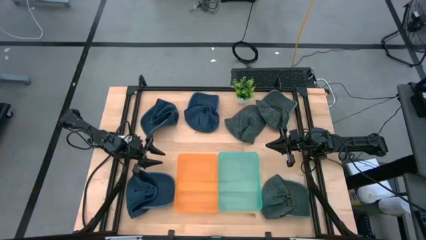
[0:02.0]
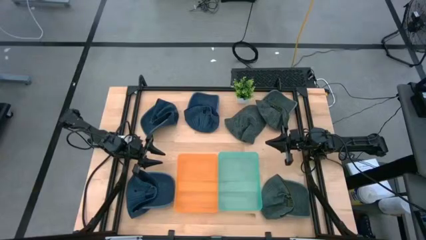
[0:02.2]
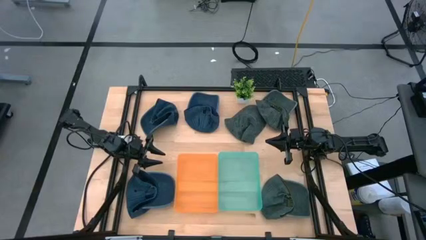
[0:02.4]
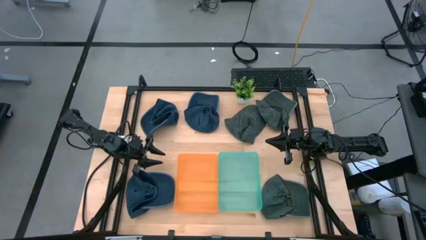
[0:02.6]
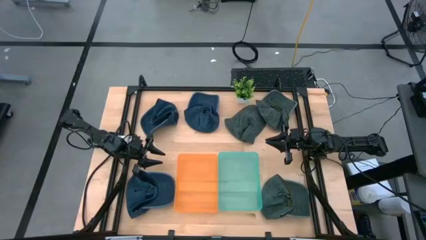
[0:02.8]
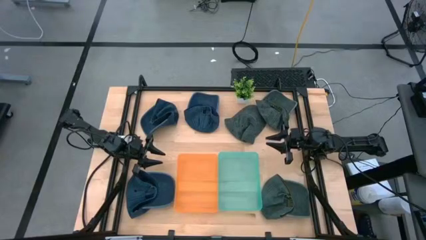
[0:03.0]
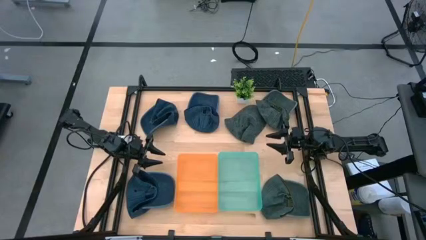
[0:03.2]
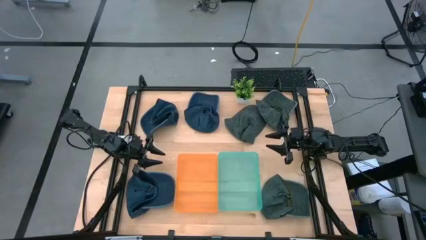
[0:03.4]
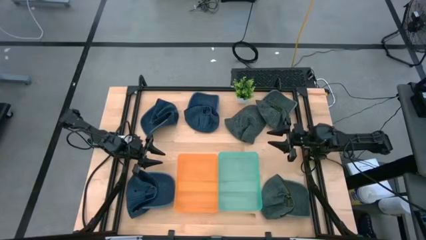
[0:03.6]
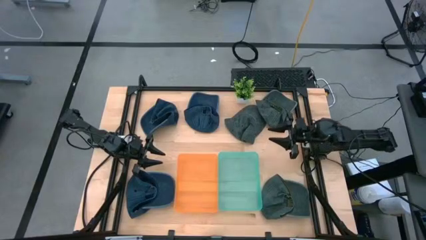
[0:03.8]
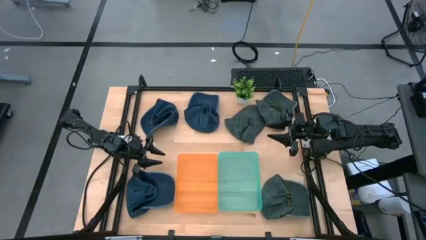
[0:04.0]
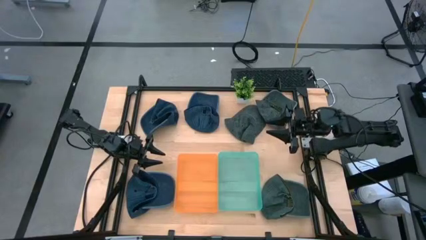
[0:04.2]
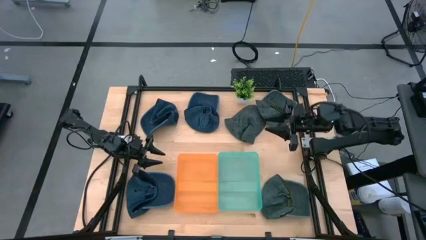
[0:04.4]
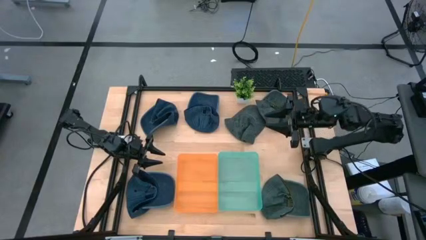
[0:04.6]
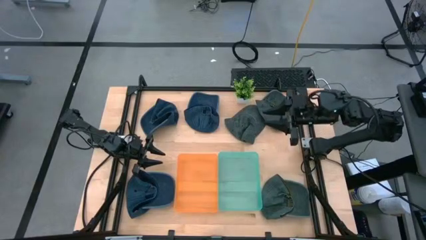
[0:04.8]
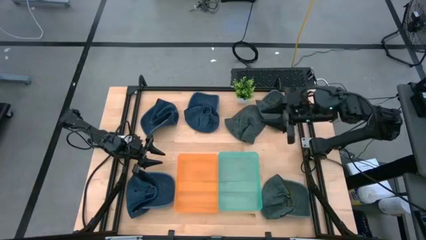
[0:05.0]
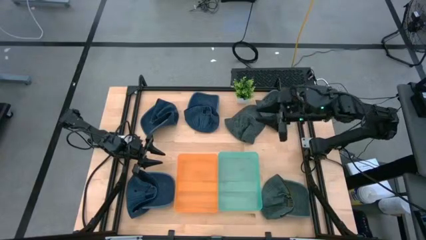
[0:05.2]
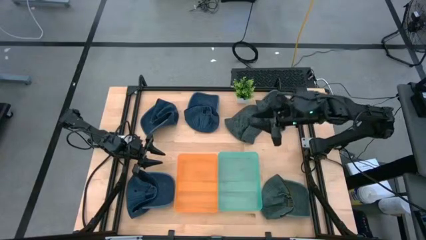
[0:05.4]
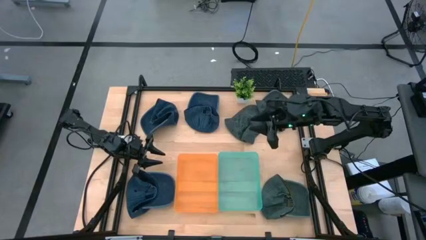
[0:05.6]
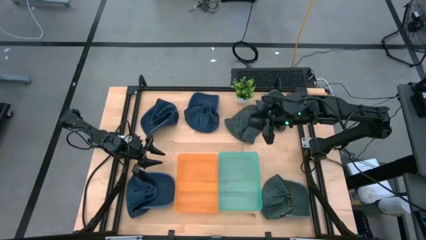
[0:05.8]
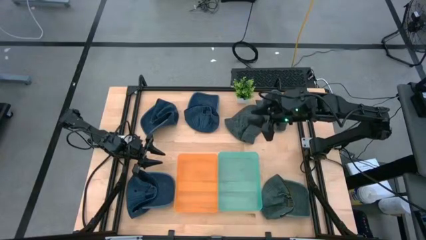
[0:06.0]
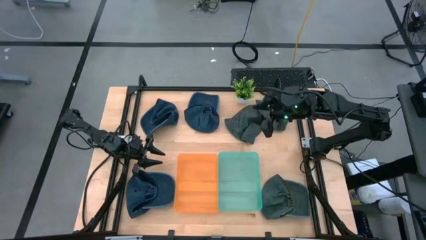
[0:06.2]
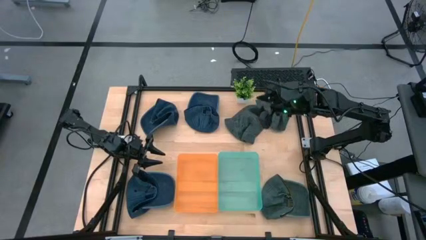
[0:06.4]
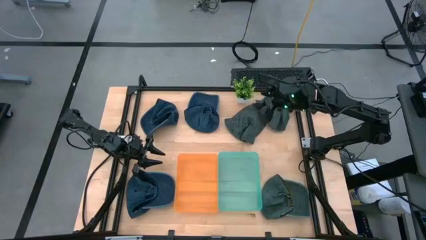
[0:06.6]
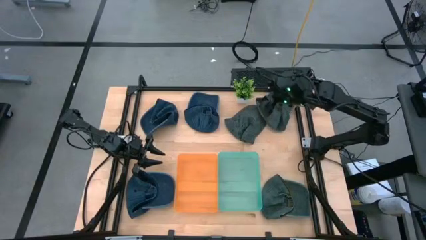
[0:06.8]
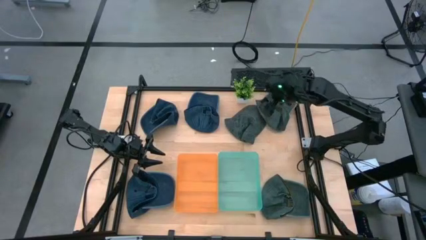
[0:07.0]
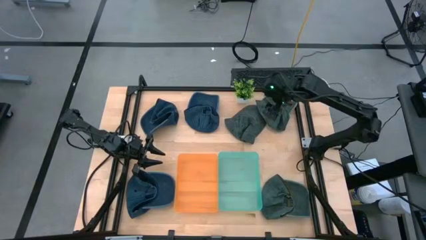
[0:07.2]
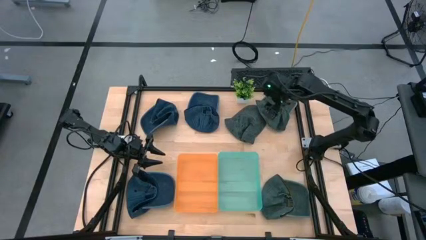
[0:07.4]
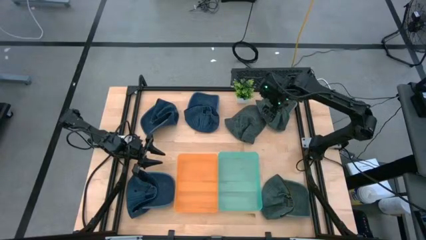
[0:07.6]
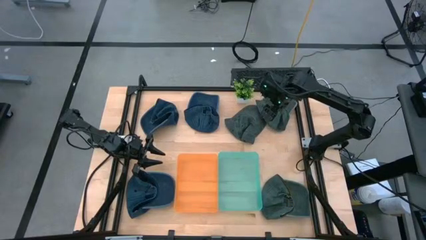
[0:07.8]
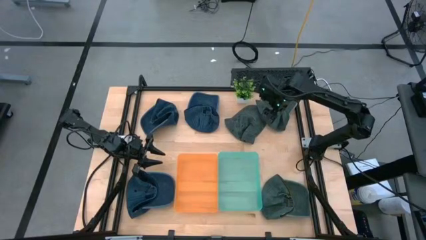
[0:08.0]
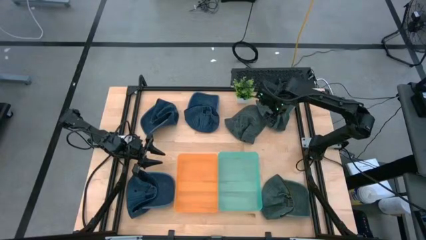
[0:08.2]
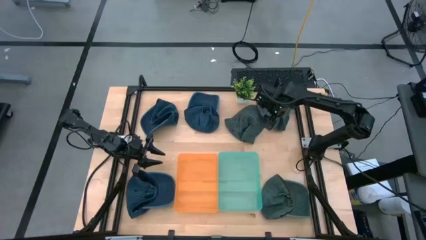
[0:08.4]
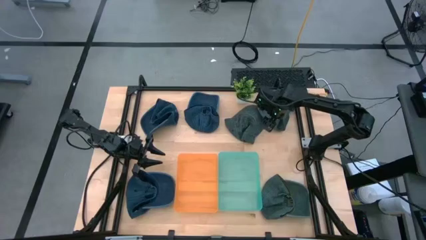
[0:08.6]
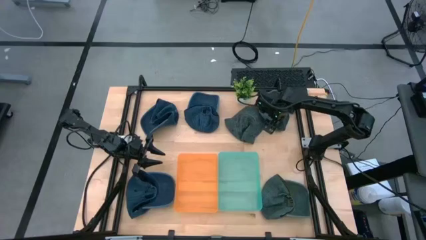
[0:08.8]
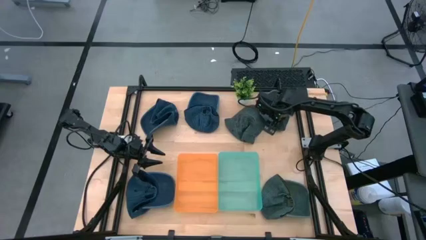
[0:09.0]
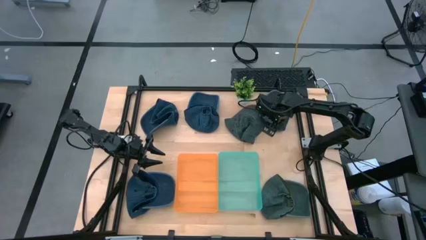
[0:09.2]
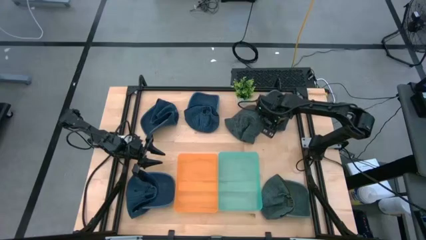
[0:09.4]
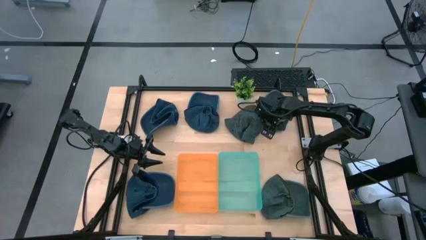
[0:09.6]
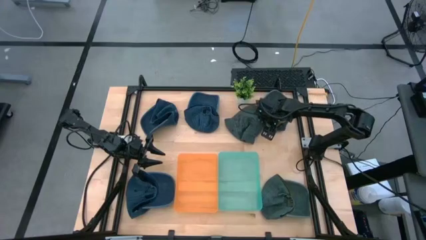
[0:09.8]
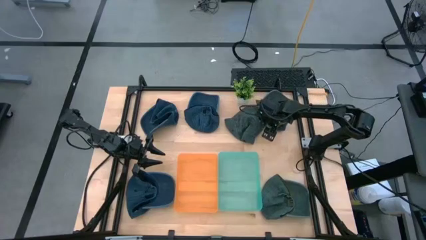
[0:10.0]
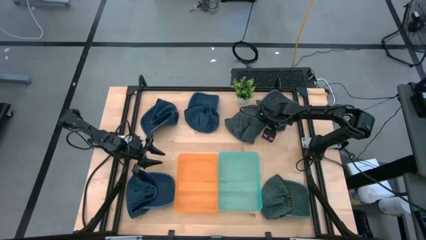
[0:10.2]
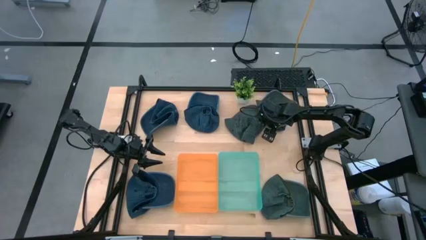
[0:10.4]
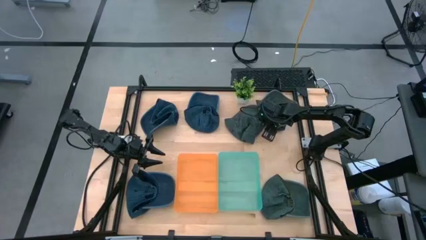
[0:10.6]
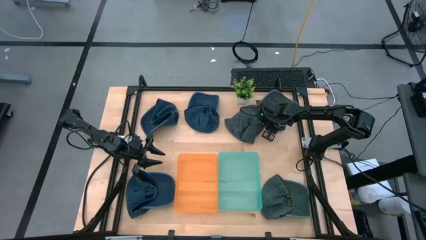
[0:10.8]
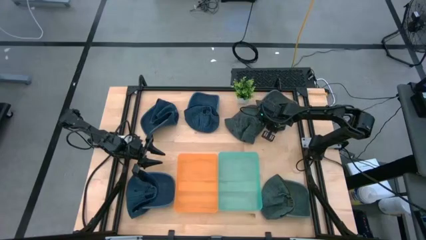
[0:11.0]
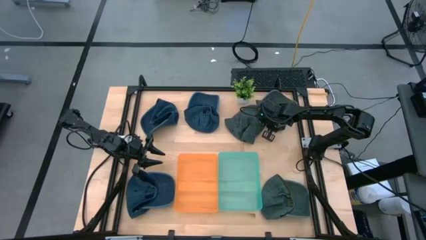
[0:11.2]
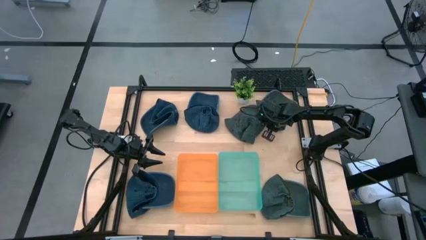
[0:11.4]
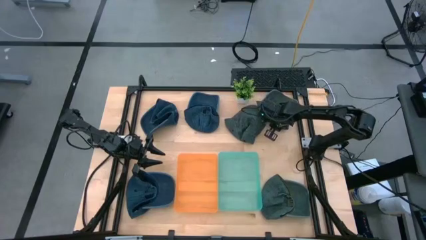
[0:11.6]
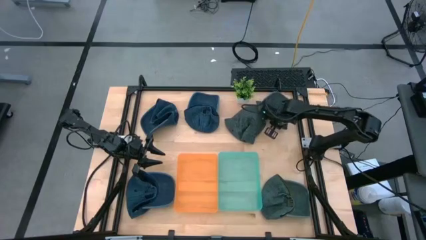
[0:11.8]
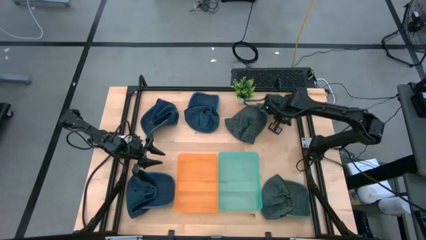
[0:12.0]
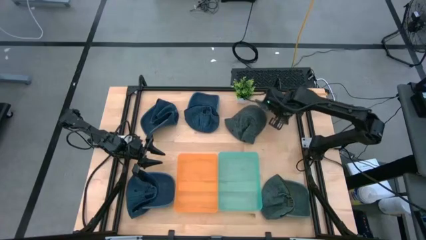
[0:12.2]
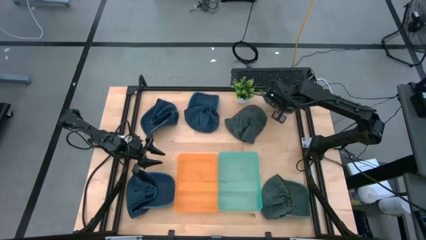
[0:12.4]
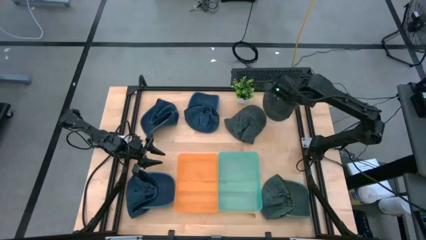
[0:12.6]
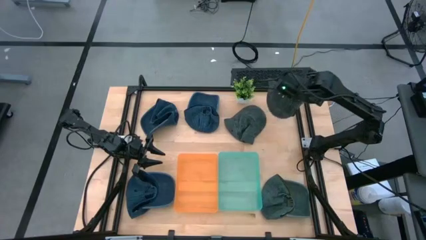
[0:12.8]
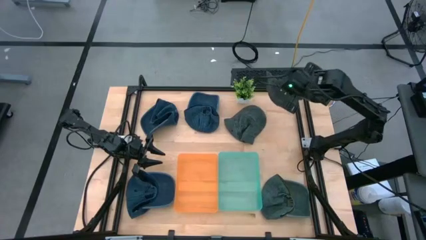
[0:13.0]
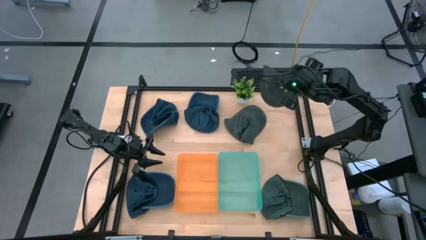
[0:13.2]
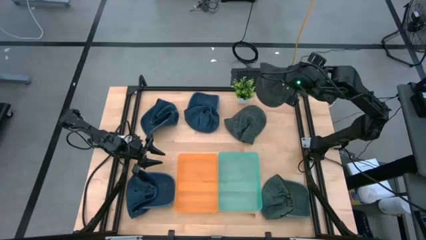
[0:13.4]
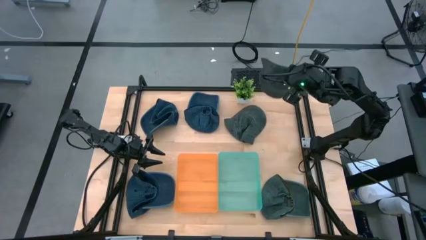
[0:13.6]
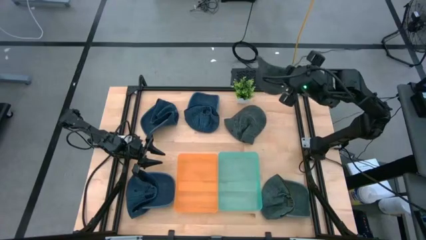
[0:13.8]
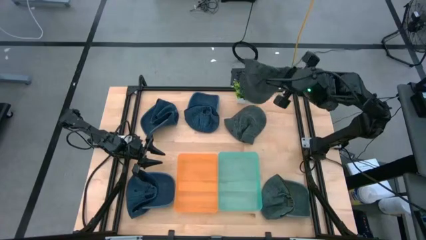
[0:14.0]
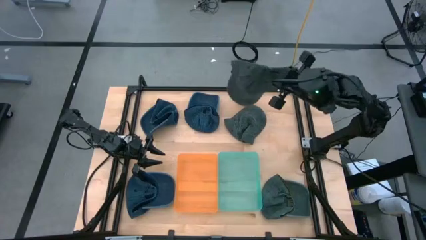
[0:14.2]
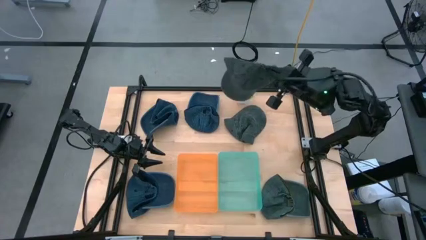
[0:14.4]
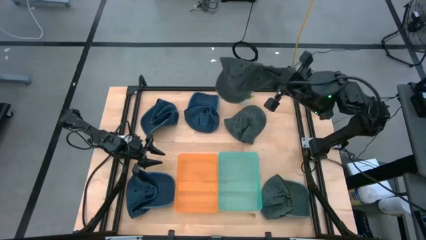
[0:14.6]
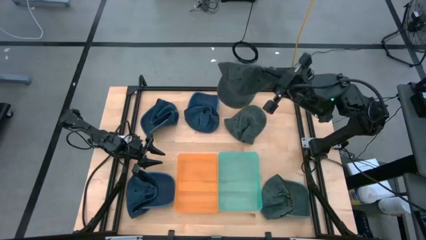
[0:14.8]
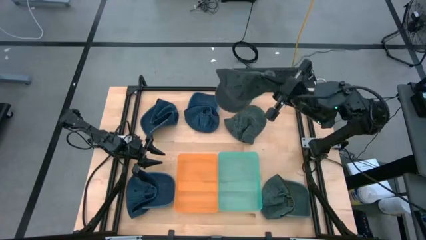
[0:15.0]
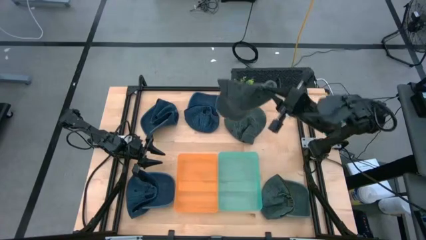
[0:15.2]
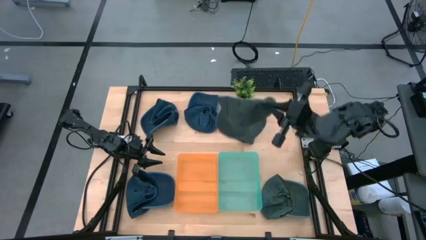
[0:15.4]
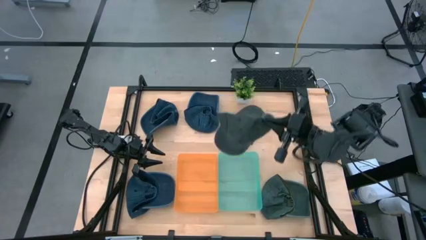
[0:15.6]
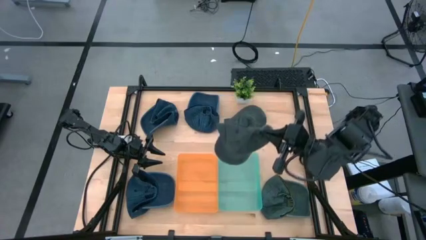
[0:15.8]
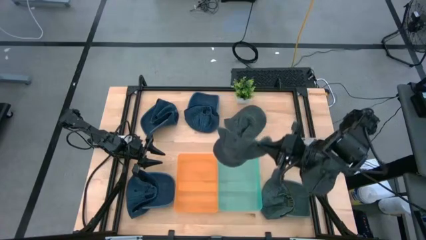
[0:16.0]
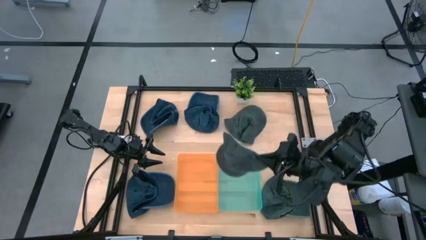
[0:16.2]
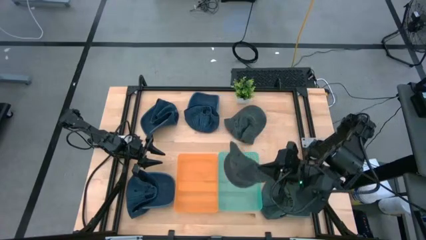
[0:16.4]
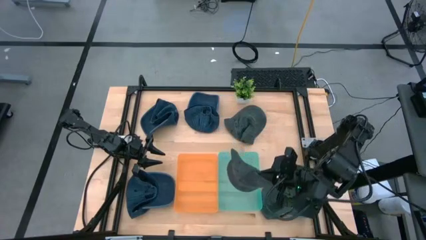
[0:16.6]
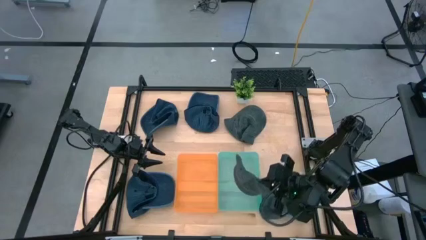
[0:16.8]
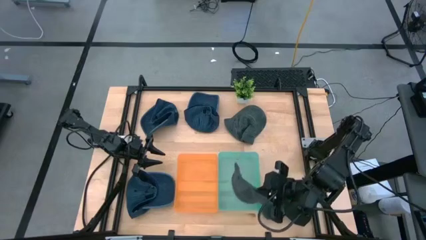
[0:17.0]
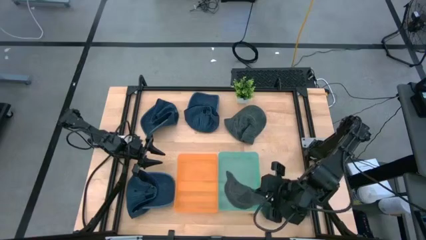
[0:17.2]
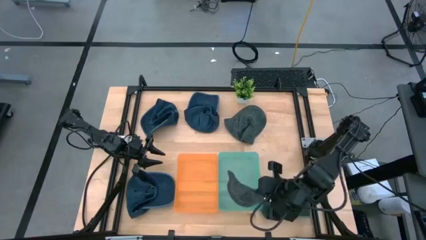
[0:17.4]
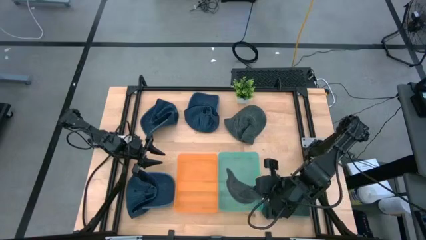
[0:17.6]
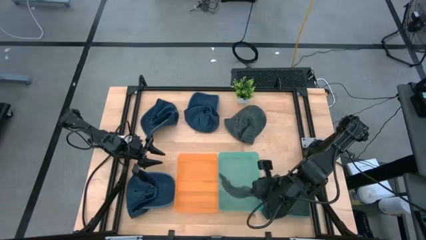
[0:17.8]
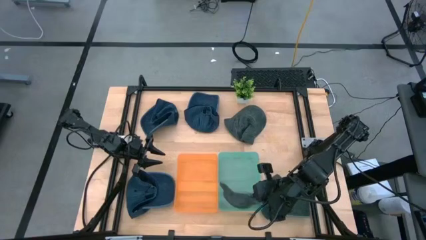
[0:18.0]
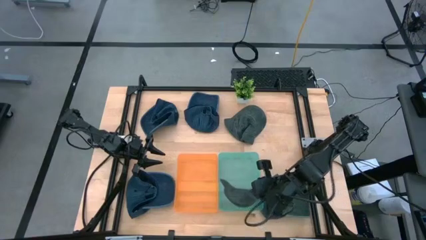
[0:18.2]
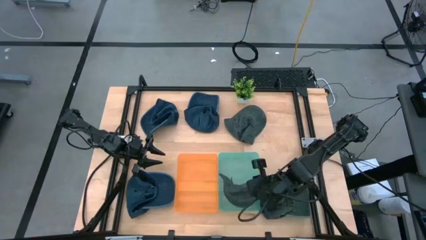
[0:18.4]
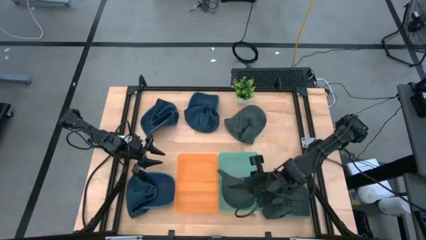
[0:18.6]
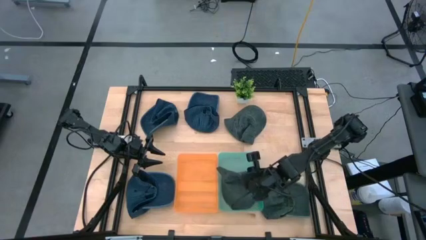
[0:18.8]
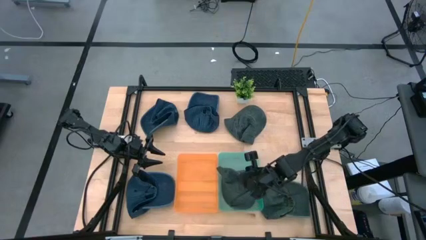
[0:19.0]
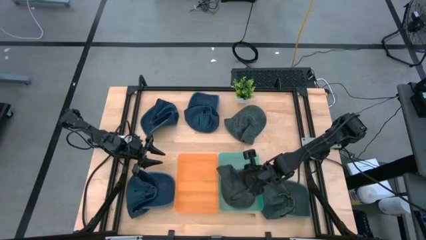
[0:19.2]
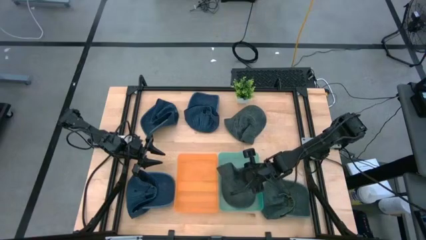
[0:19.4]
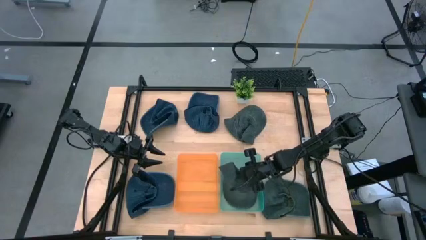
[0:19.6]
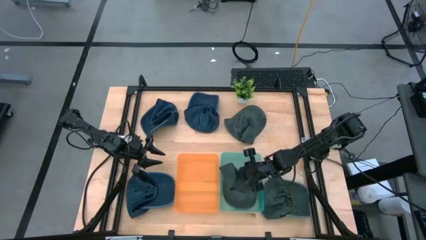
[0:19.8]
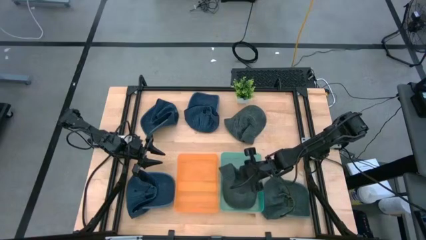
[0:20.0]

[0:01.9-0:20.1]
Task: Pick & Place hat
Put the top right black cap into the green bin
